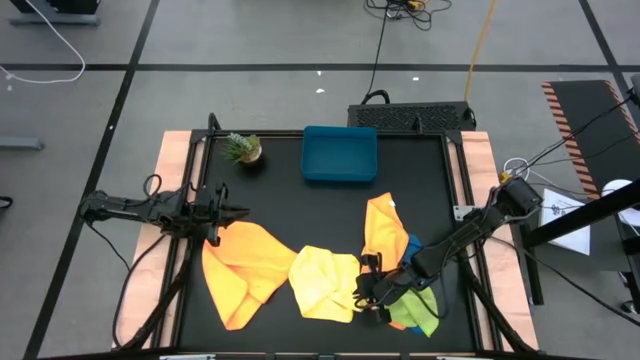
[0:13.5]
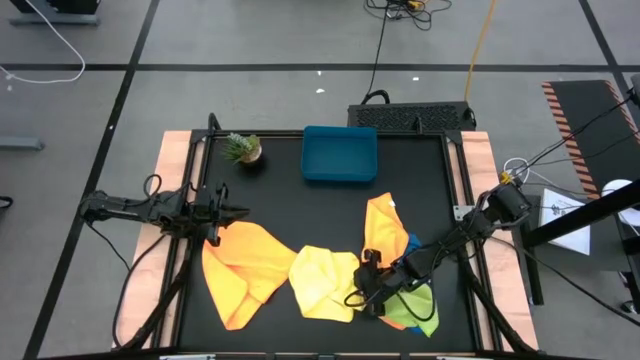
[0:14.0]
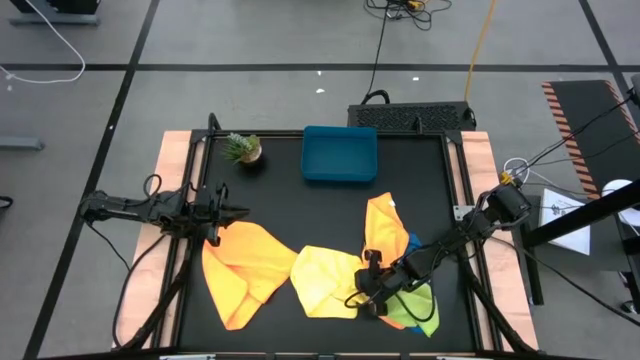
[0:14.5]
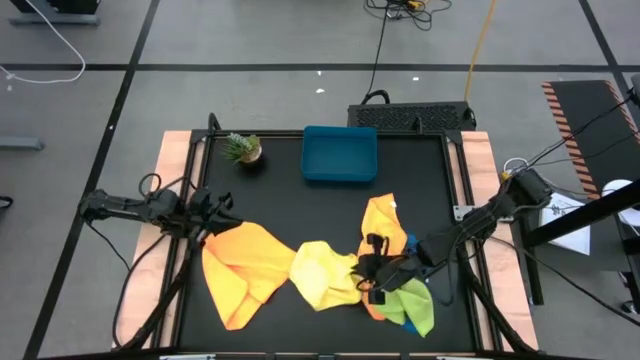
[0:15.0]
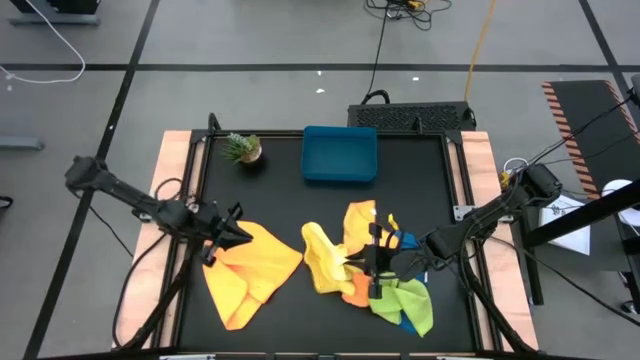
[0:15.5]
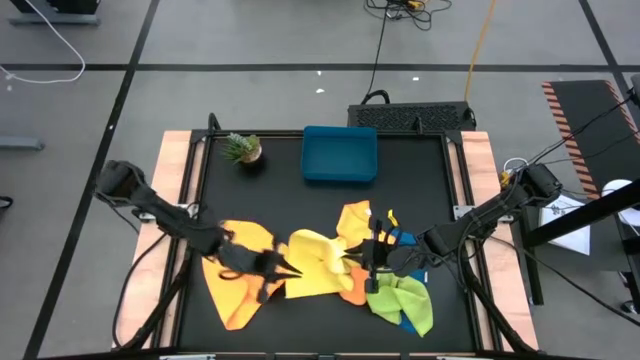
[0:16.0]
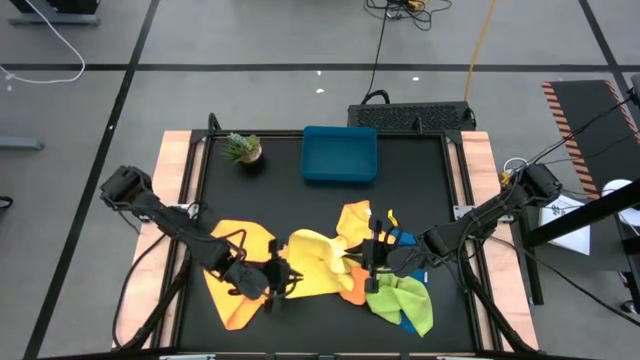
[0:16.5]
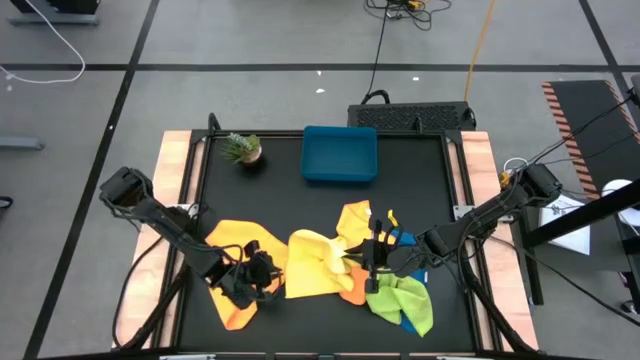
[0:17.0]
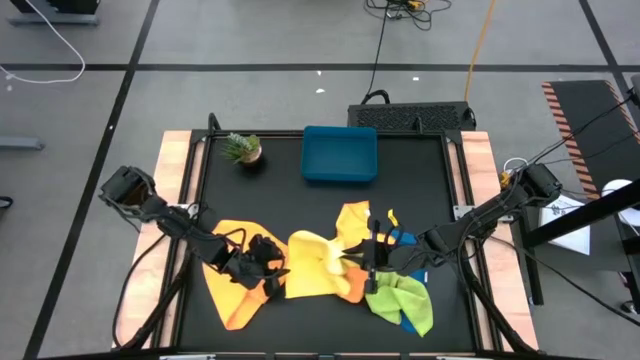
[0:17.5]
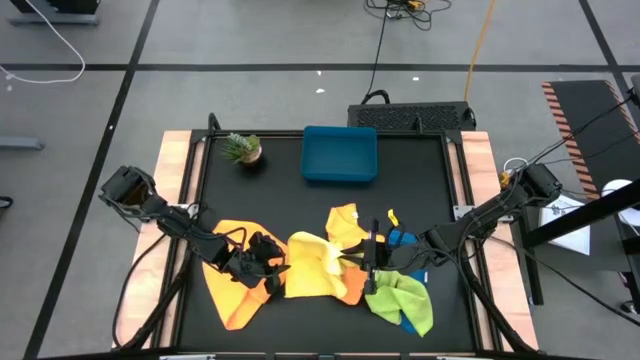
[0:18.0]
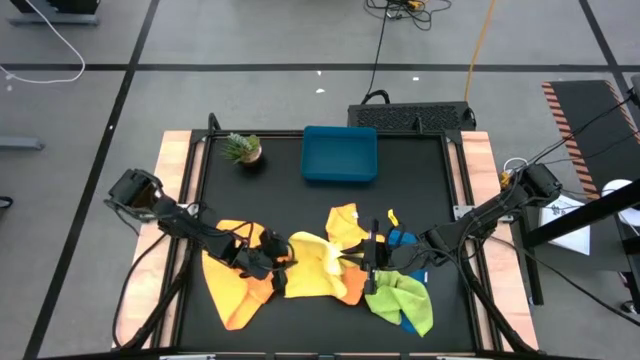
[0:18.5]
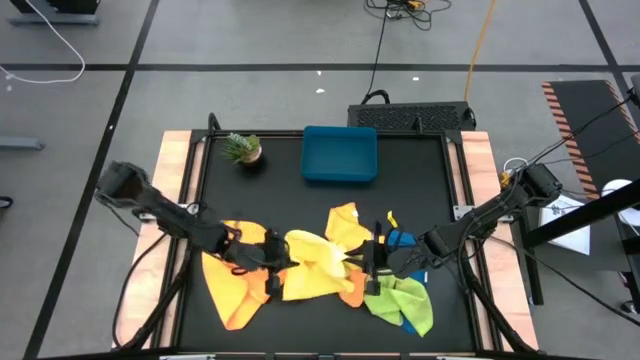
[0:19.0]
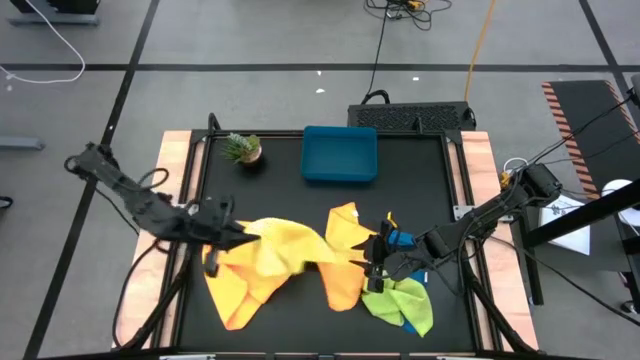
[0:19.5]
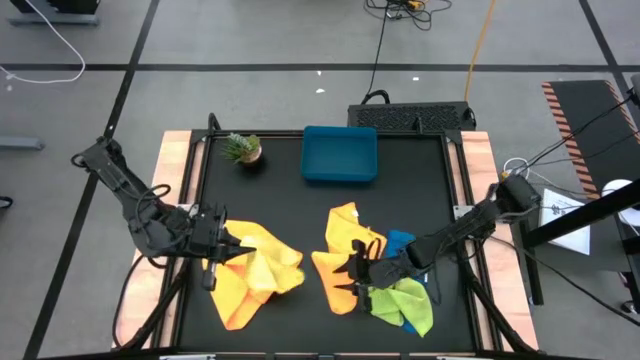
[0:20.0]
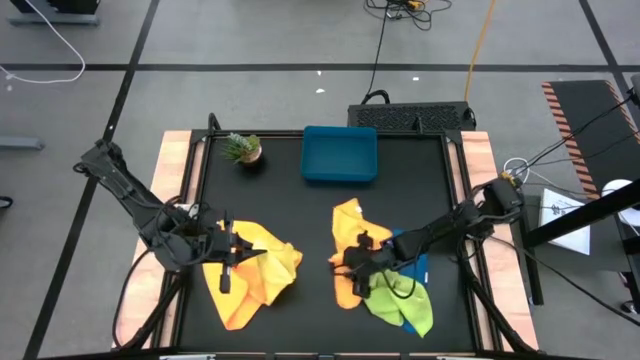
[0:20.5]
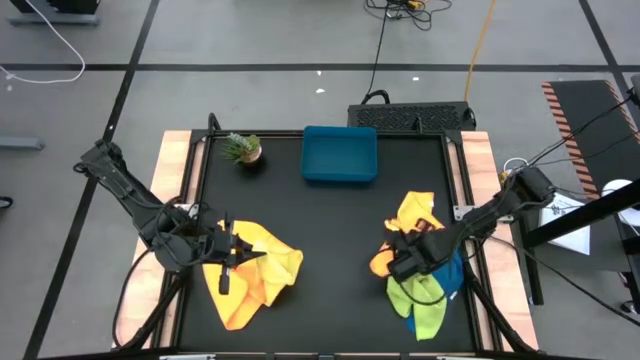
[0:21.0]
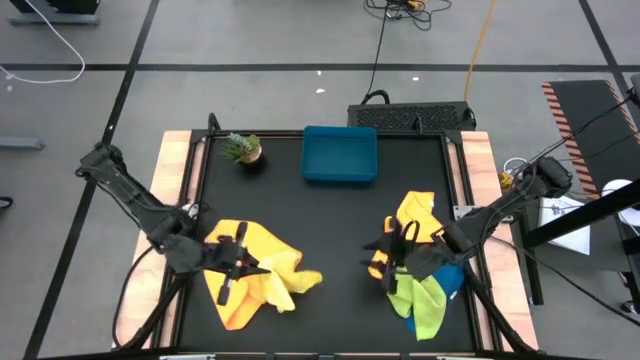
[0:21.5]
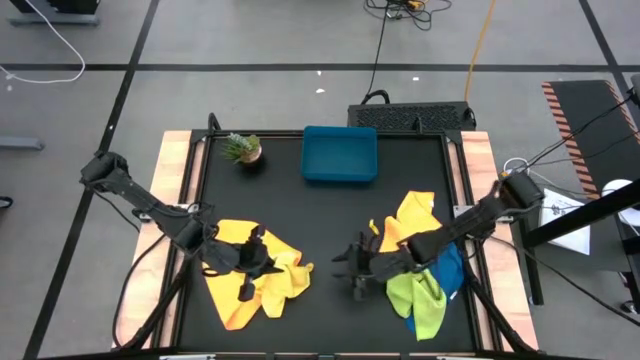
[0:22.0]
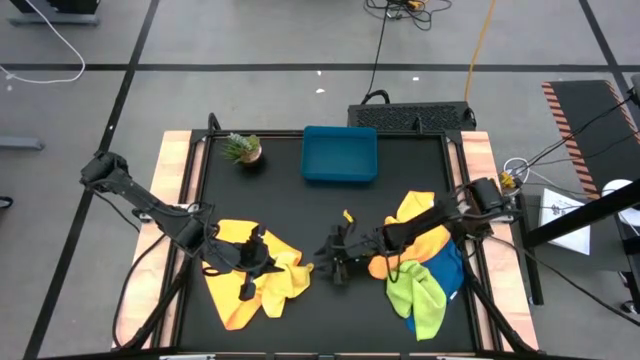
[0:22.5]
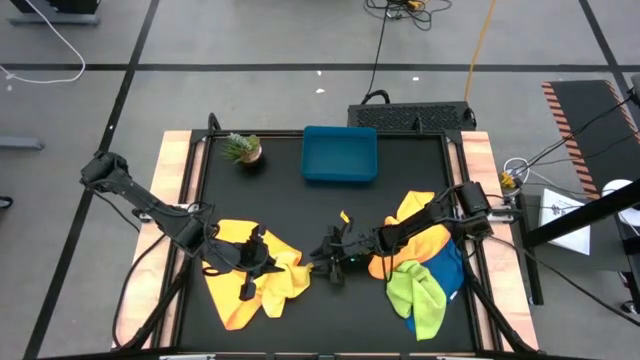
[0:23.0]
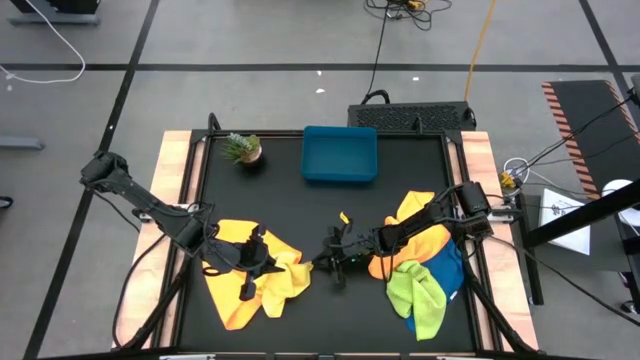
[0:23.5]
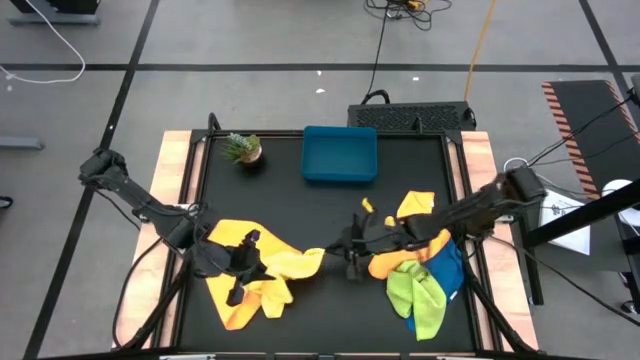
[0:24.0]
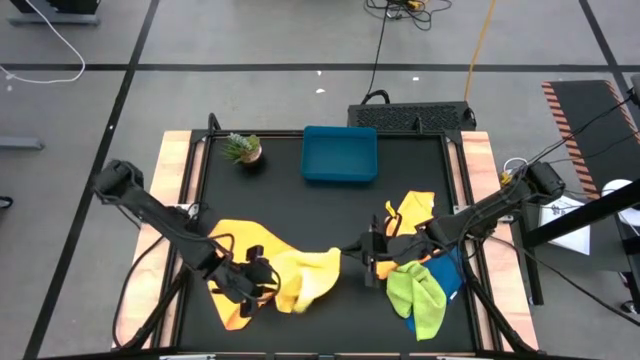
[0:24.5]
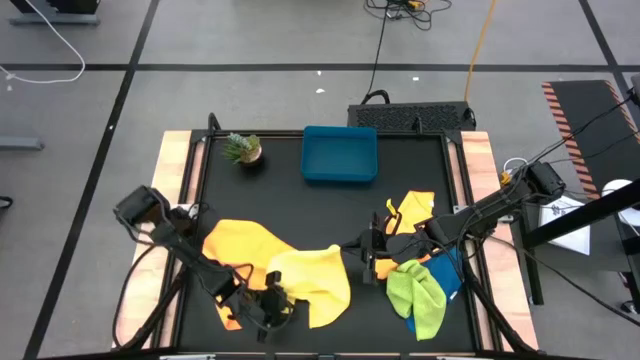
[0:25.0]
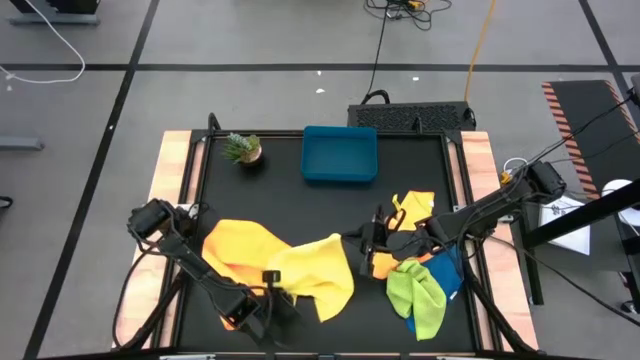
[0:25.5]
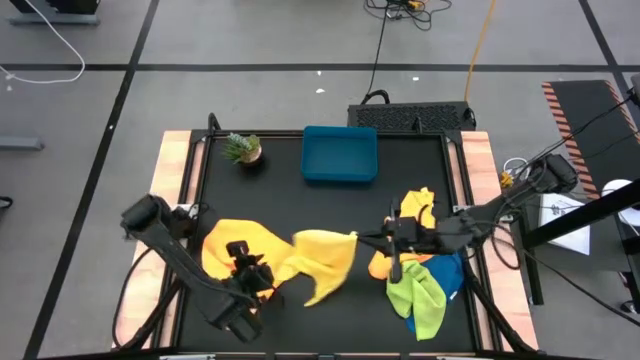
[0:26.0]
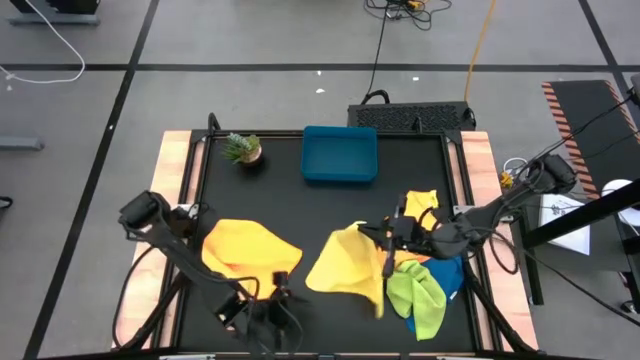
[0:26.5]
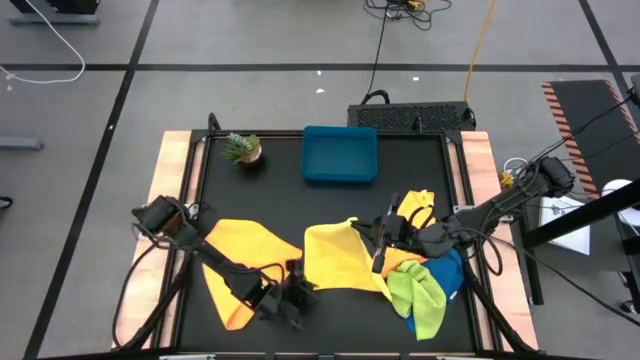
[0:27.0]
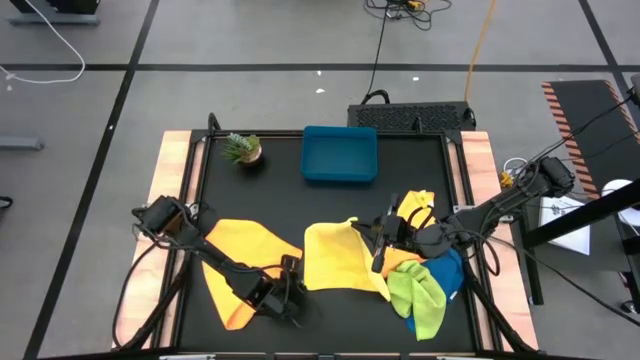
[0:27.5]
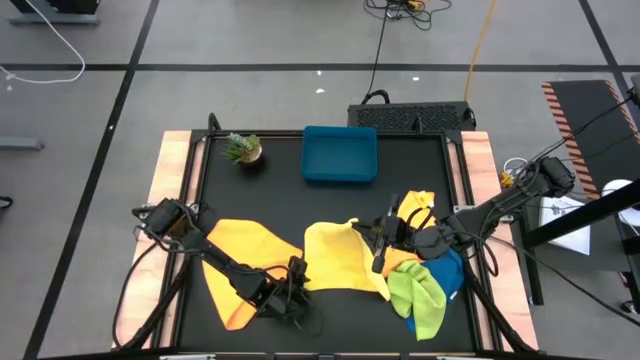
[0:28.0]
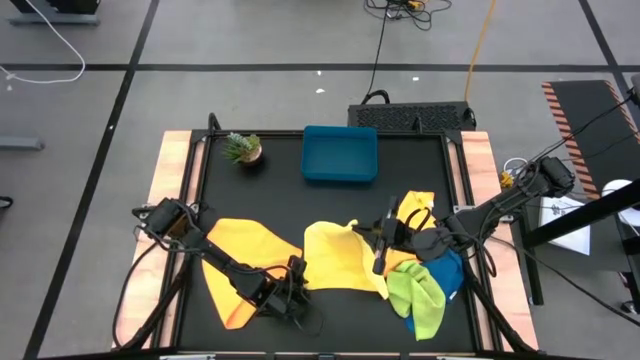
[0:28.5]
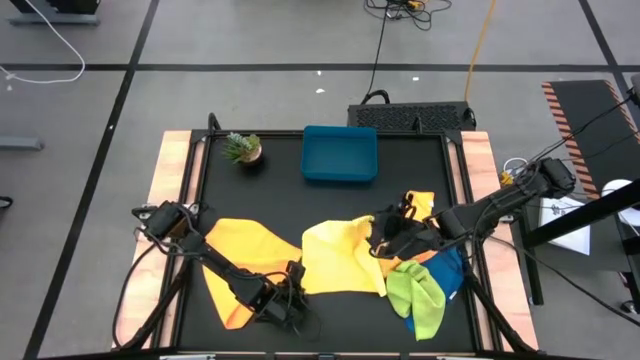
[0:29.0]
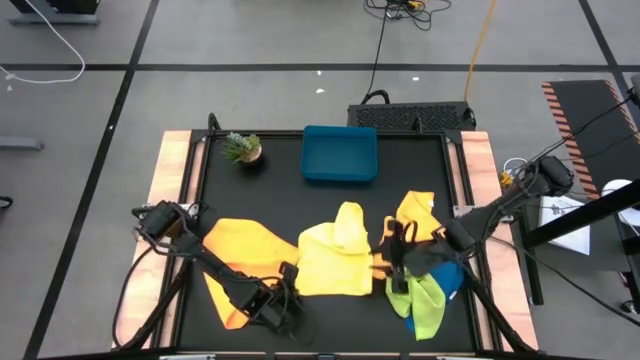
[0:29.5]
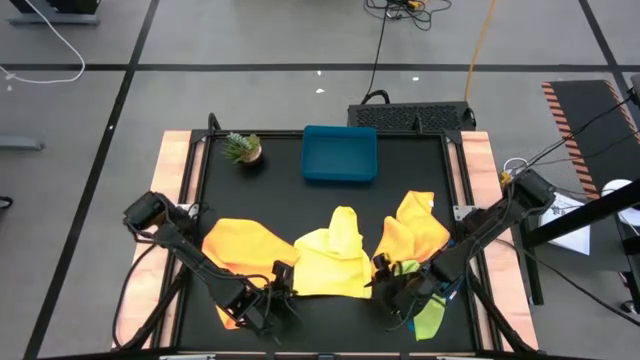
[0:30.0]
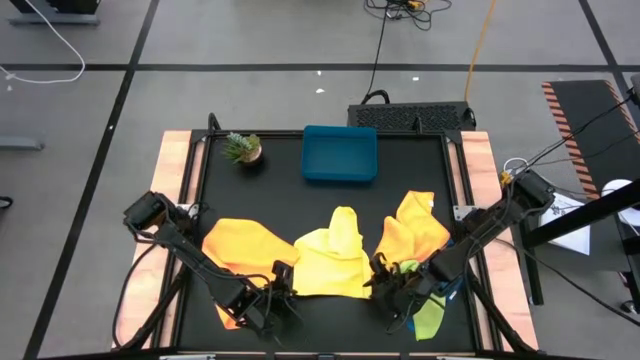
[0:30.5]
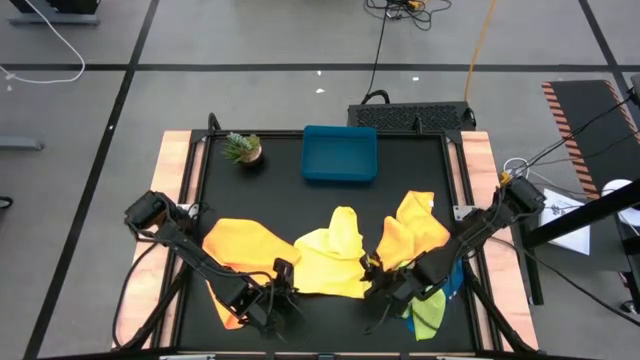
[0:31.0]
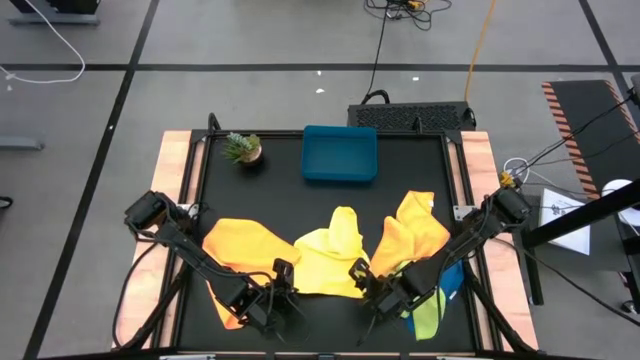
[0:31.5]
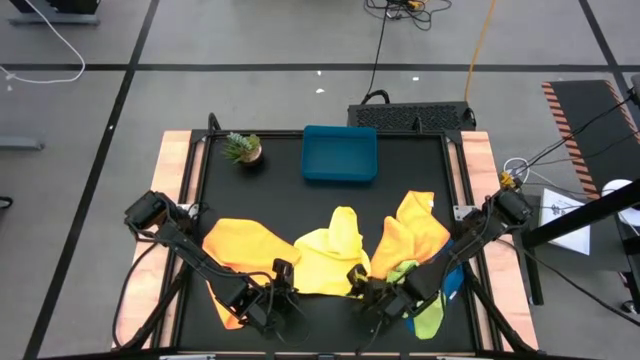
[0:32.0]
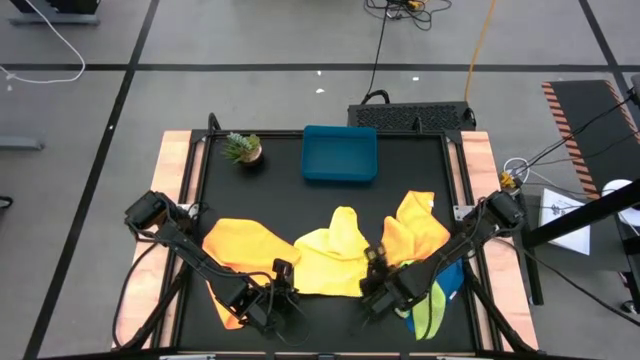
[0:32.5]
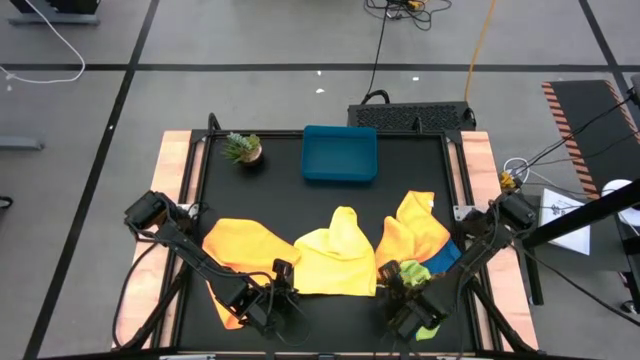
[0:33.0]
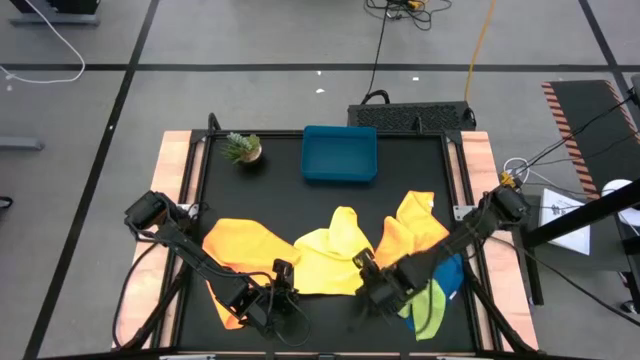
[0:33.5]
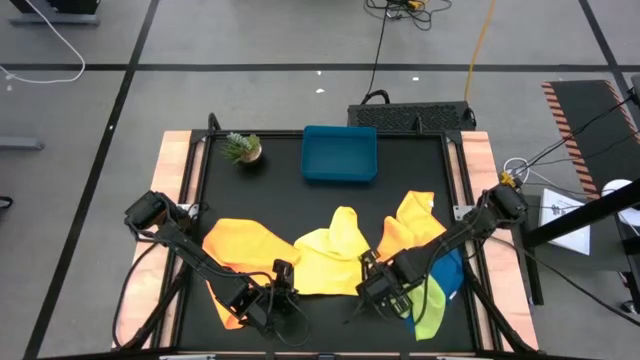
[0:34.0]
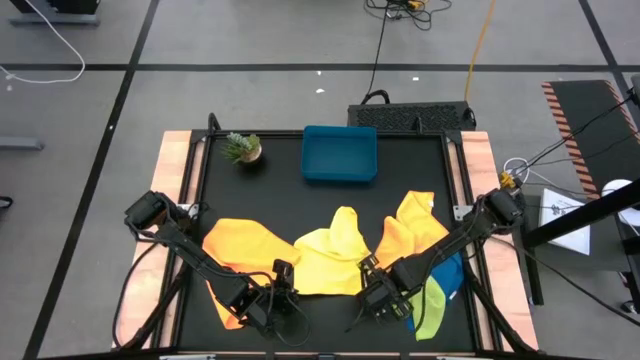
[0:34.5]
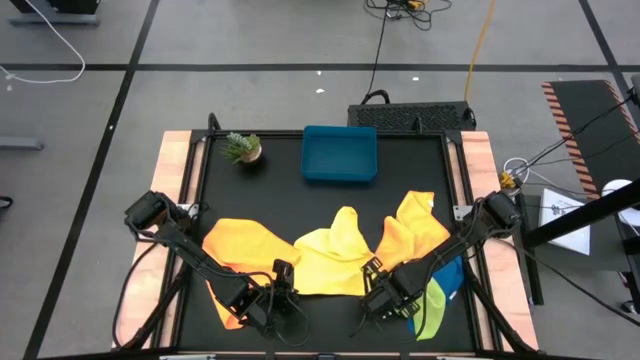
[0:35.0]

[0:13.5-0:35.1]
Task: Fold microfiber towels
Fold the yellow microfiber cloth
